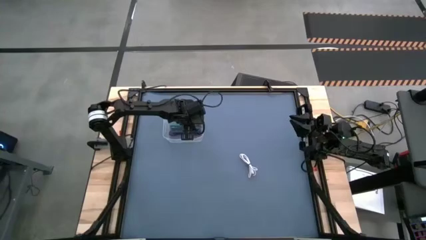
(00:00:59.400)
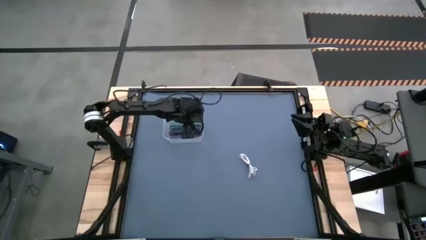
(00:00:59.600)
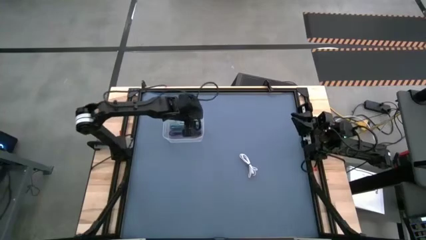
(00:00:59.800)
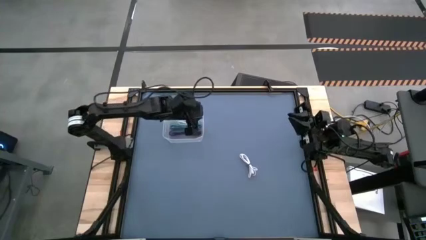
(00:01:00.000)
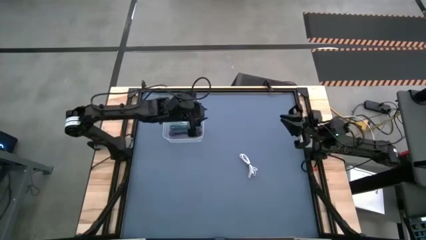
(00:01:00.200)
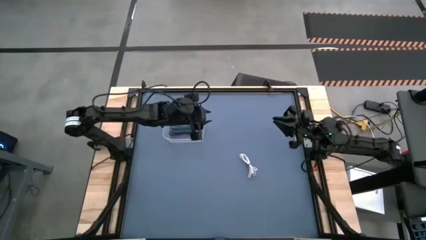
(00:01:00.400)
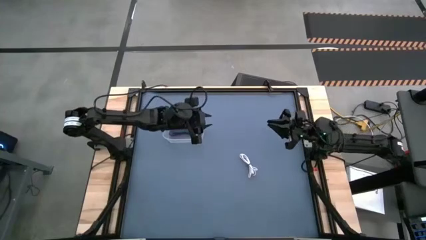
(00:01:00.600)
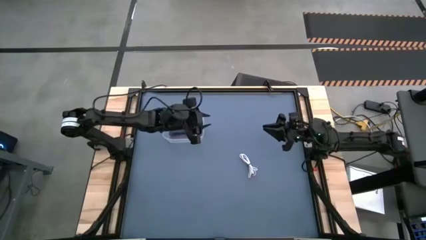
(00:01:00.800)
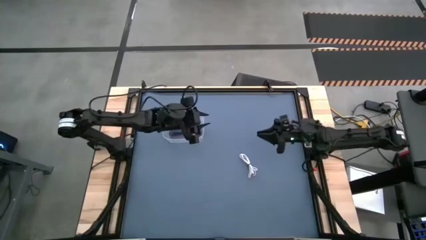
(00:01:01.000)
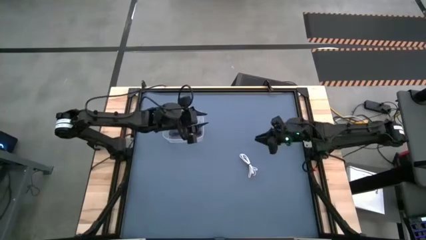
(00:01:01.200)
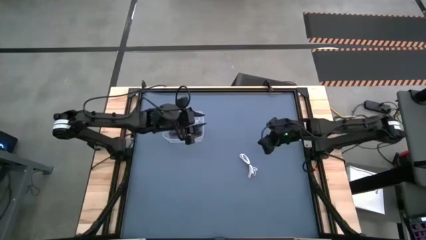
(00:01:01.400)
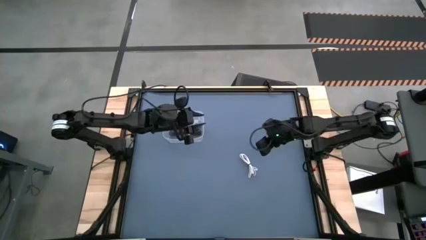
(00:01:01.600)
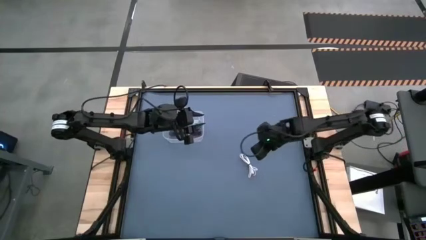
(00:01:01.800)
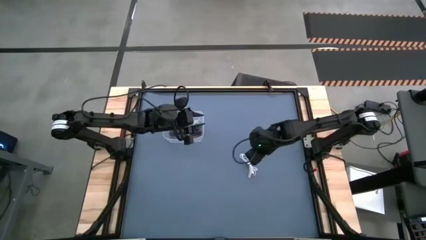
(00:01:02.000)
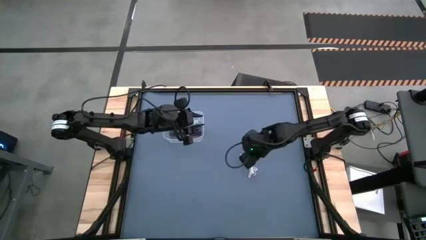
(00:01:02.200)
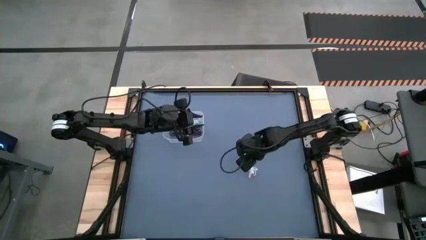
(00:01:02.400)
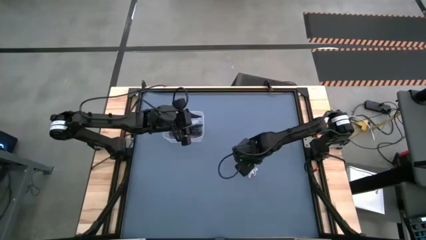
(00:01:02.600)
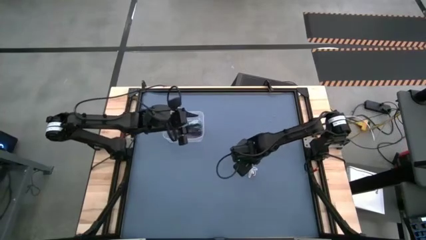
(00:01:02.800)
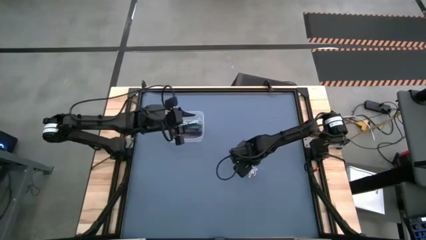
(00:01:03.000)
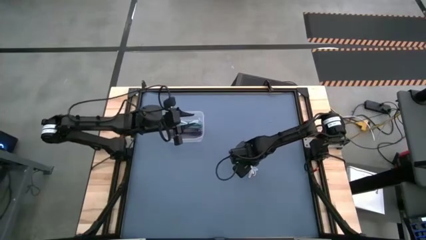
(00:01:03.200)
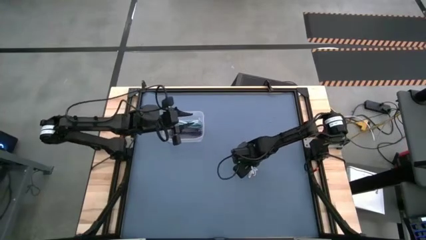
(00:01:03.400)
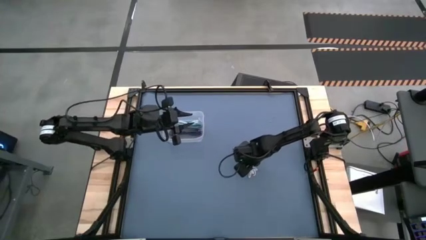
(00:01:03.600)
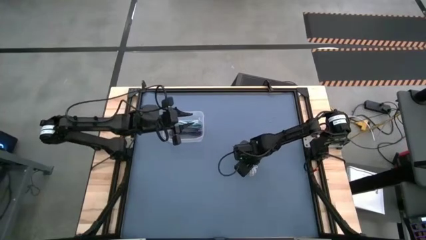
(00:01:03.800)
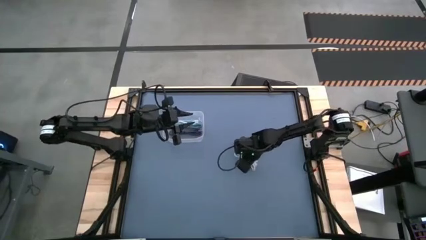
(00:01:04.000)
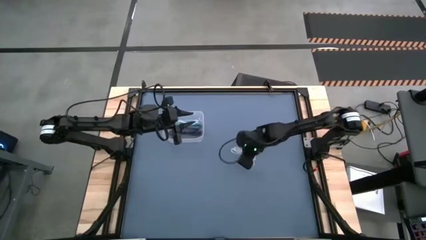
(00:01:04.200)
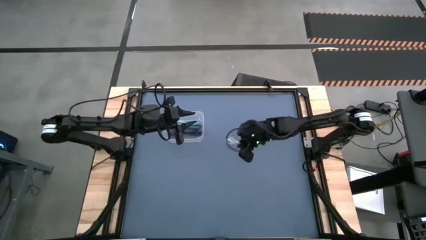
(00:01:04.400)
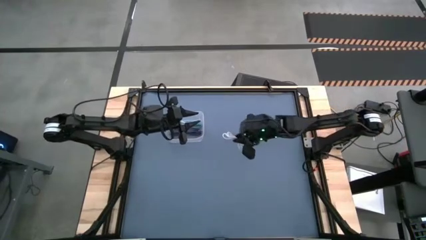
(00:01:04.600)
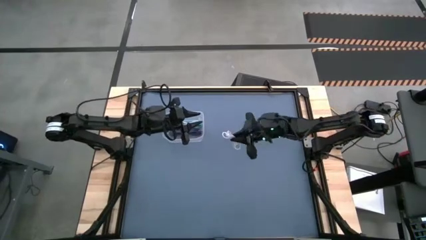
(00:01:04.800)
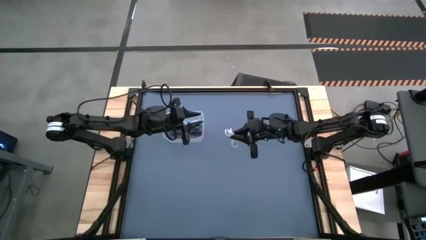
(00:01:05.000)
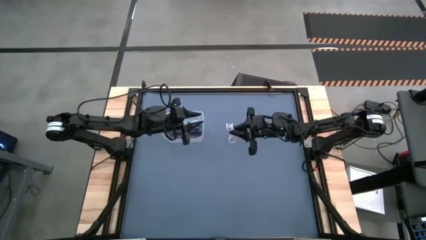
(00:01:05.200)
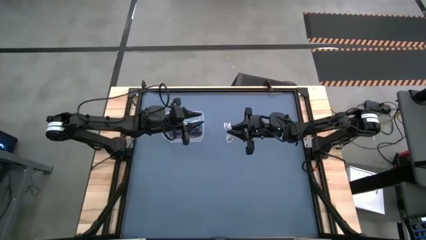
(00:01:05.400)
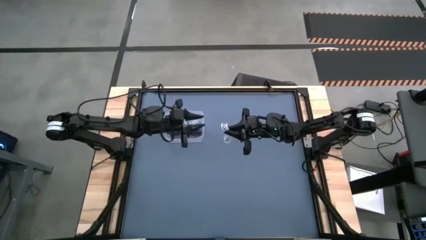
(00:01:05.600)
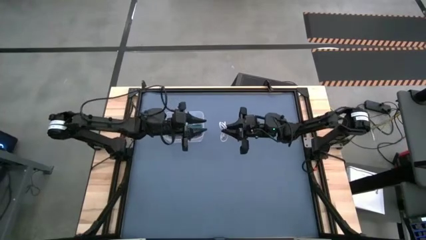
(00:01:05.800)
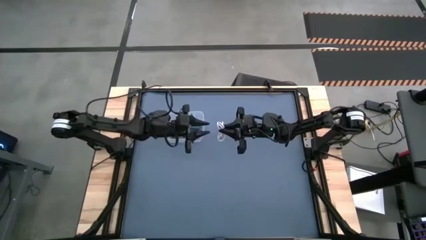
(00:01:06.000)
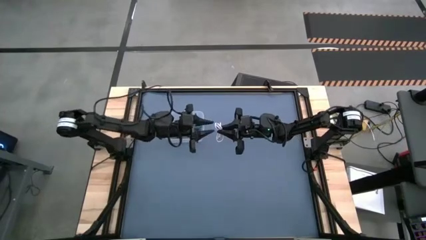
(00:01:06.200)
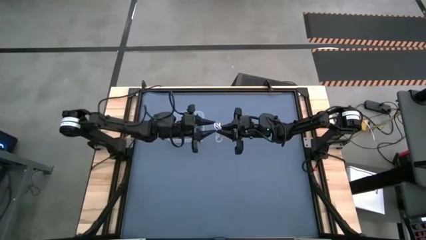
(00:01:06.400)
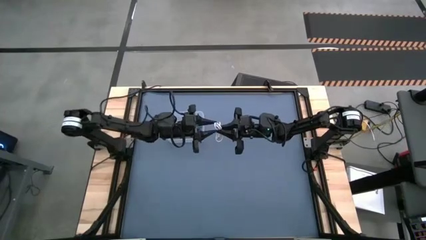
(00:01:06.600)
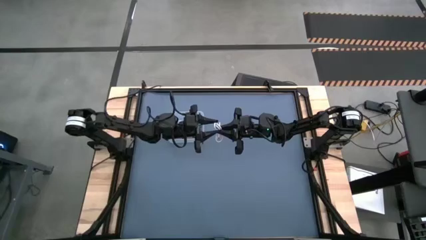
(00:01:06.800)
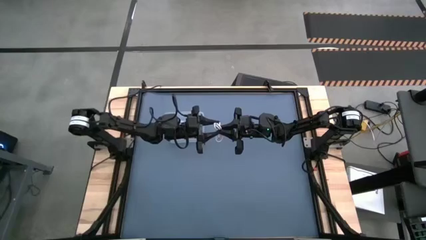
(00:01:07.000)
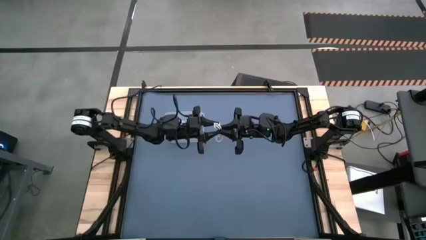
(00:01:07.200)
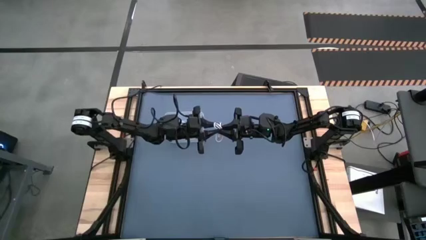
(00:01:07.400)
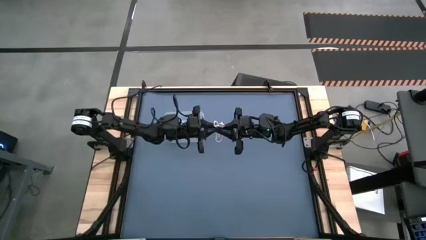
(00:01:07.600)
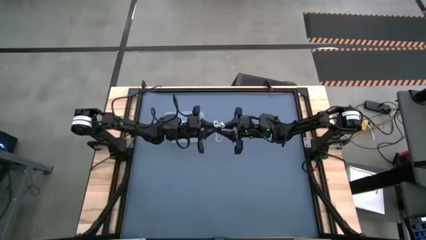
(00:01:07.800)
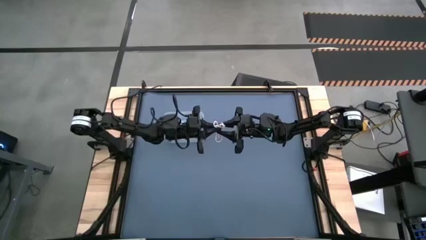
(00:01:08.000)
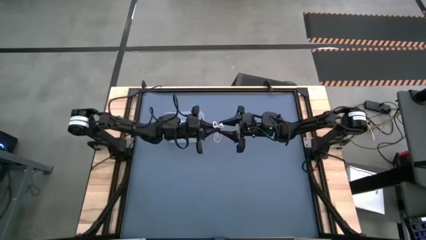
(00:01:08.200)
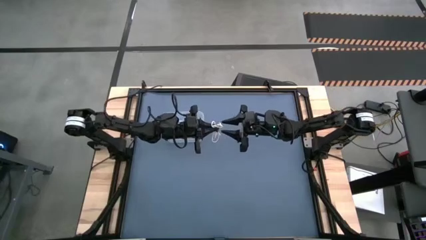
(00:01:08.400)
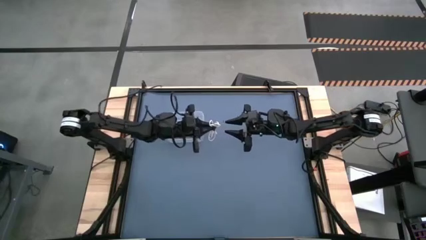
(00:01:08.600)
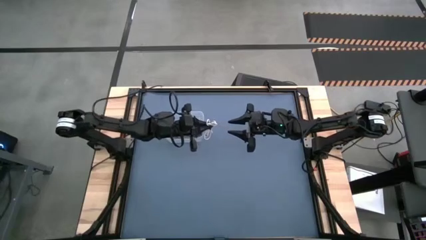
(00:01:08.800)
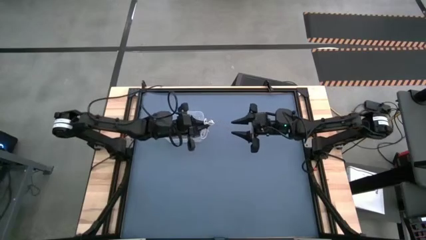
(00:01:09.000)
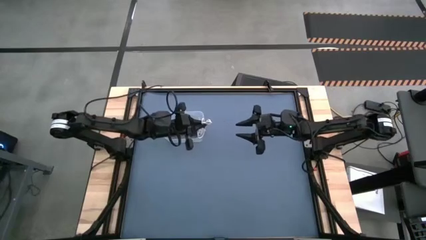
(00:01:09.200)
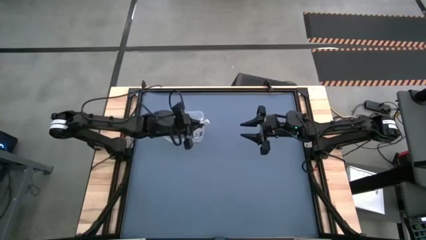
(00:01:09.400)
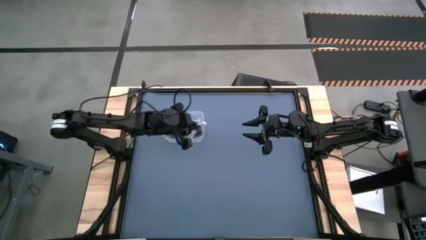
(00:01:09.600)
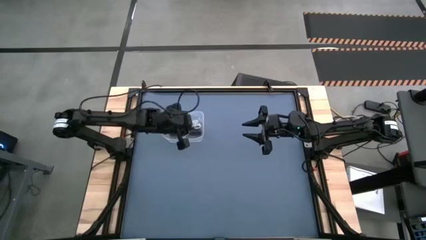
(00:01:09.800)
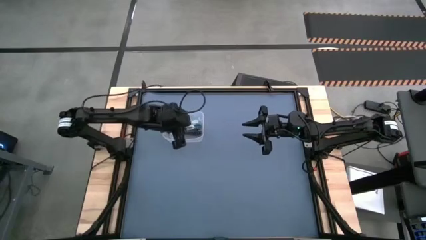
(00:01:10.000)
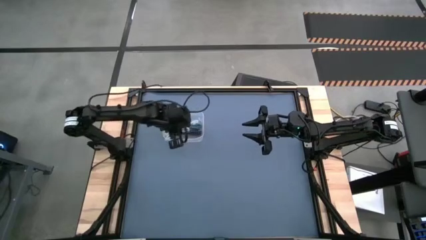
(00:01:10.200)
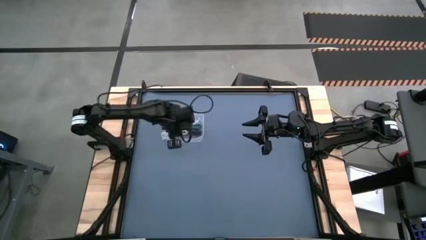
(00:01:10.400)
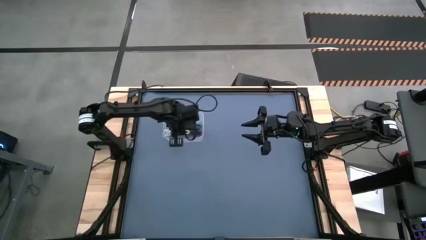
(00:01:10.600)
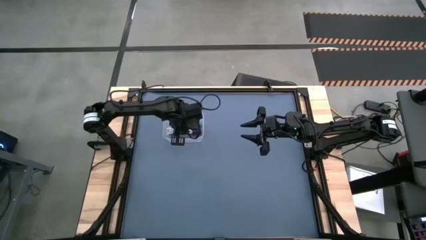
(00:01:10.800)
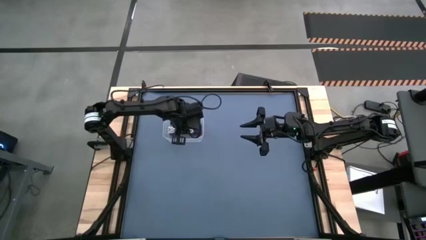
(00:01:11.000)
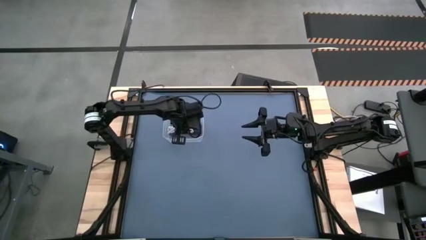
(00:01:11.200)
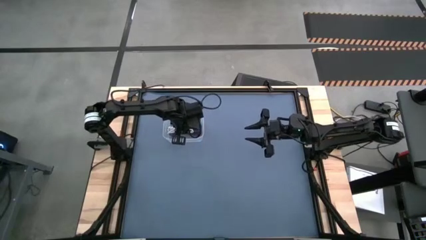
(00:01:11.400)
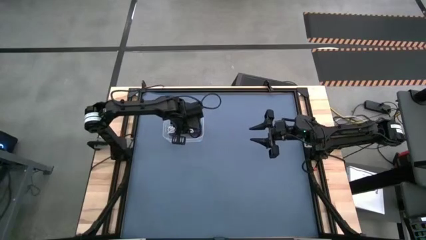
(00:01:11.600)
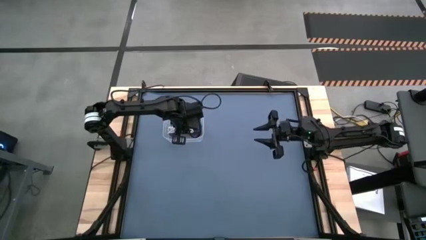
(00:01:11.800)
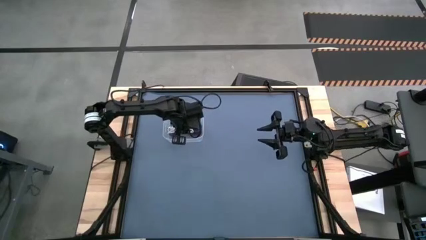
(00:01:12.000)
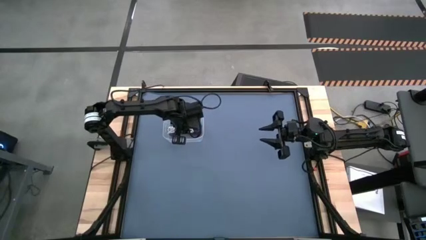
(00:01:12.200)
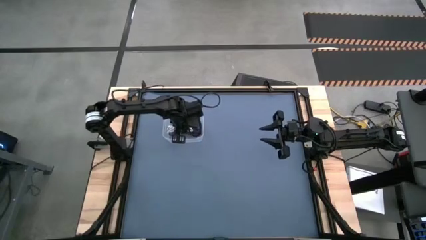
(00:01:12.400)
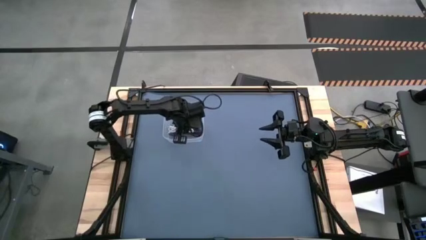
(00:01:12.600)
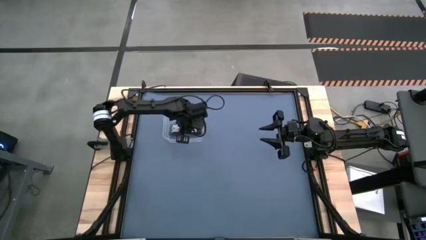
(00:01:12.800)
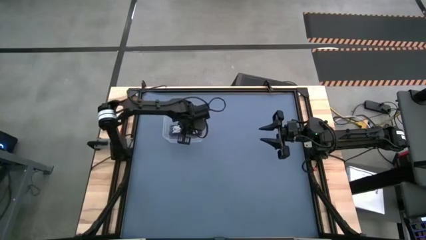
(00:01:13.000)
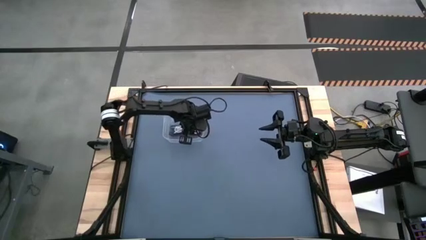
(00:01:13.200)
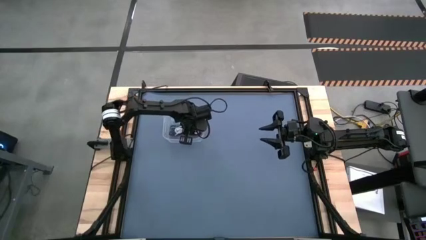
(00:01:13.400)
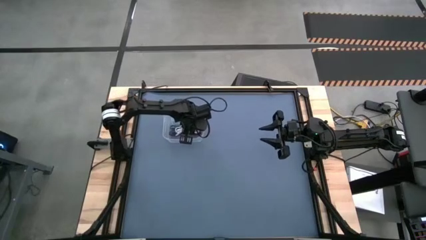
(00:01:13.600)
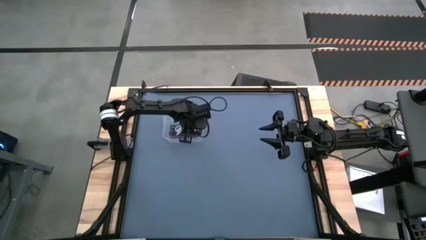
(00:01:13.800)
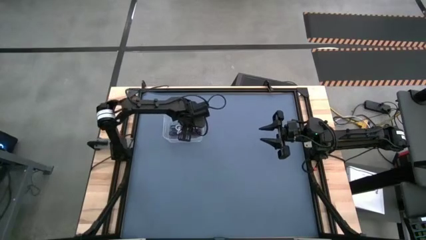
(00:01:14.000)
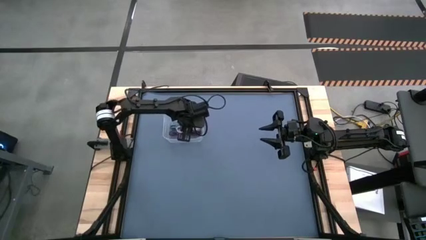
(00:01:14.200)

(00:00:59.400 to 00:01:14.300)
Task: Pick and place USB-C Cables
Put the white charger cable into the bin

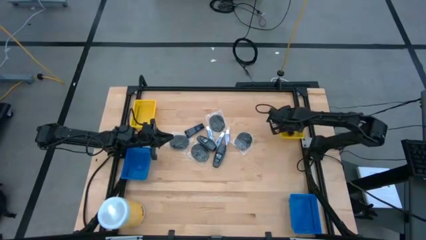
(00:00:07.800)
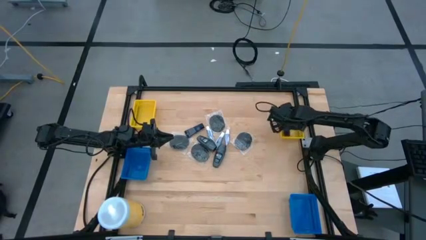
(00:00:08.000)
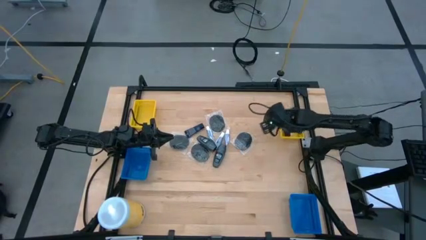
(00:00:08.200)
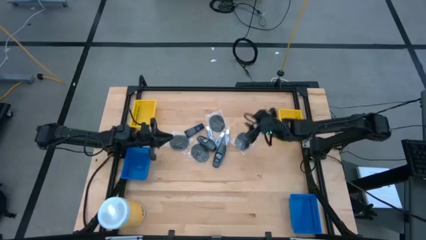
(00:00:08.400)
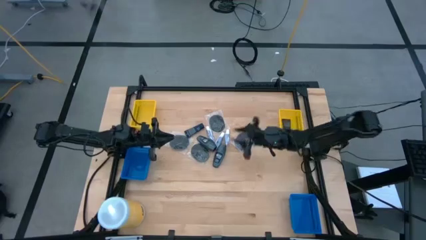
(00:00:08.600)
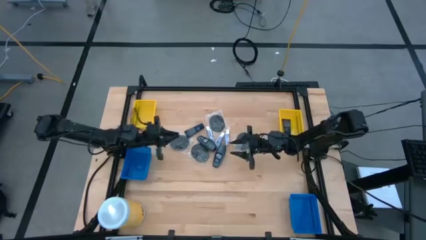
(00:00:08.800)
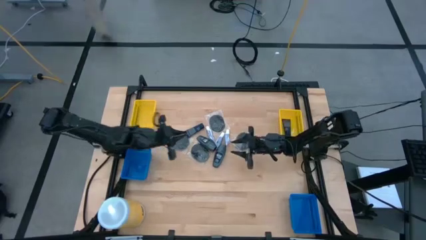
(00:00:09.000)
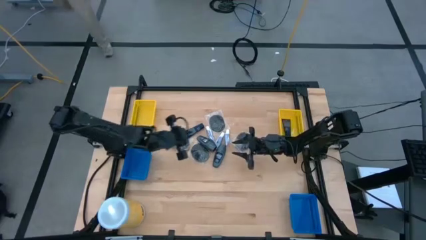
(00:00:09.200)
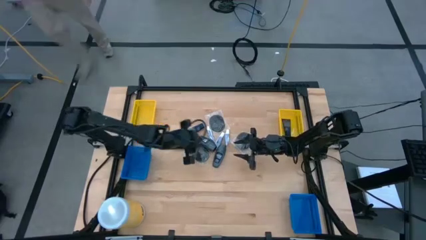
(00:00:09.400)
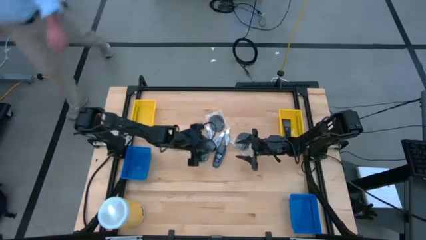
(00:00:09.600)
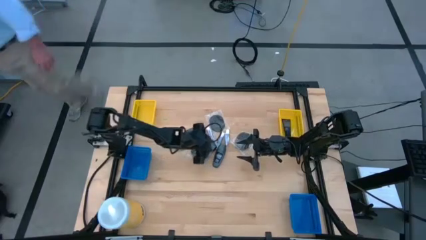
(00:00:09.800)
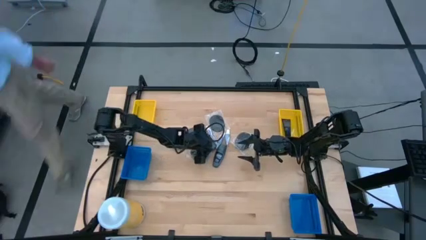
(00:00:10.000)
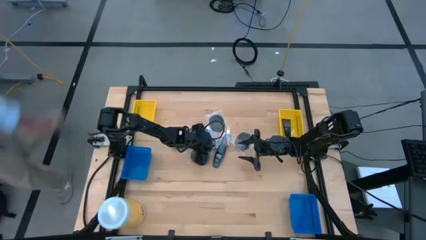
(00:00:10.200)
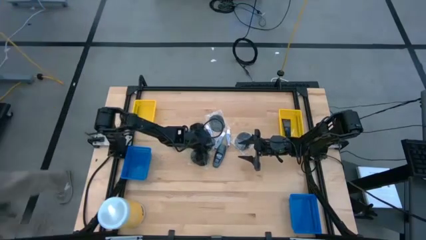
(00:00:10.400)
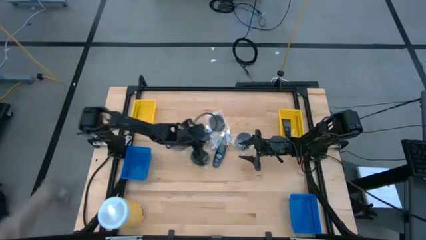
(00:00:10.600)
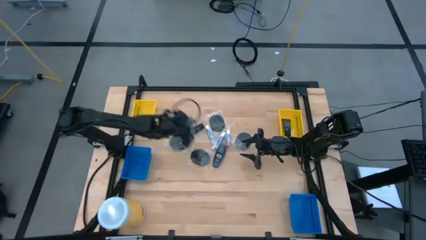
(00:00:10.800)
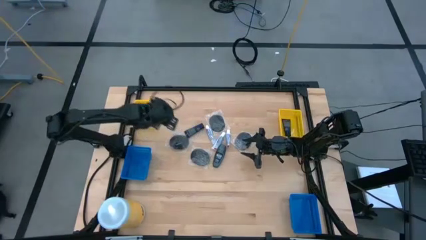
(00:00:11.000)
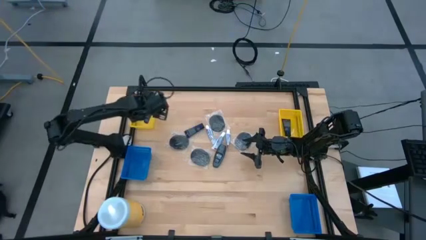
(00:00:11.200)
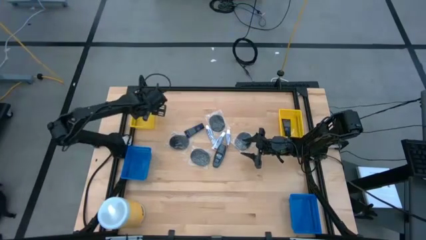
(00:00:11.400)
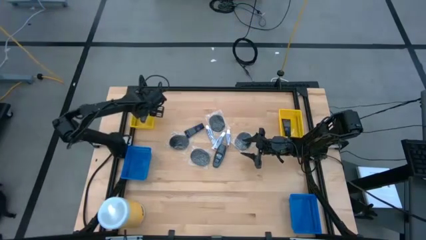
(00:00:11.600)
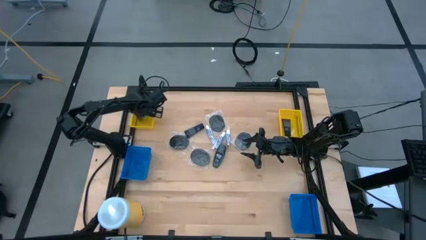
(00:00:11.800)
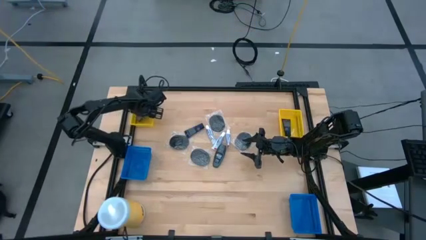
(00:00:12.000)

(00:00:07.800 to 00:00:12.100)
Task: Pick & Place Travel size toiletries
Put the gray deodorant into the left yellow basket
